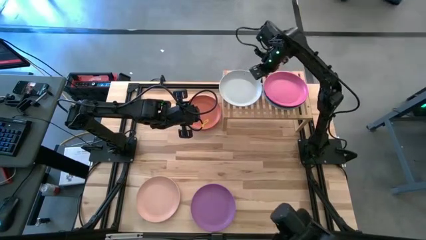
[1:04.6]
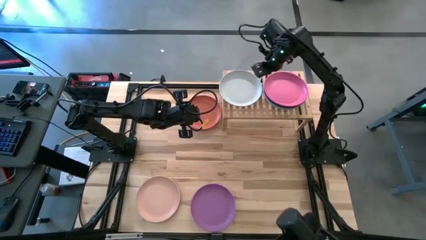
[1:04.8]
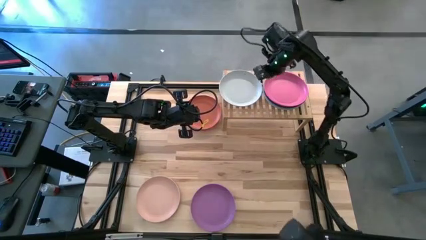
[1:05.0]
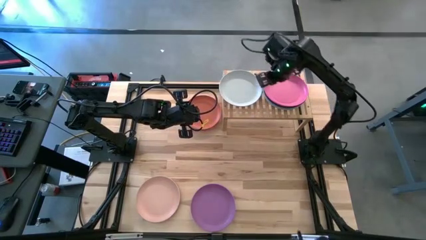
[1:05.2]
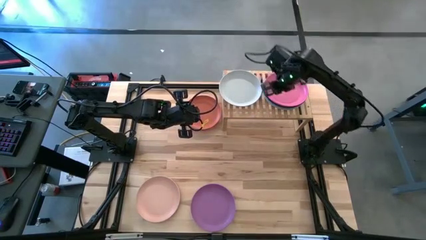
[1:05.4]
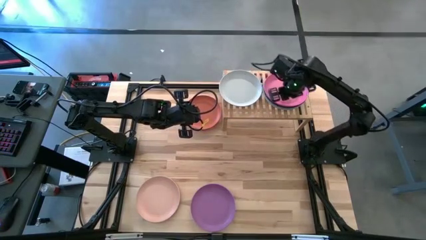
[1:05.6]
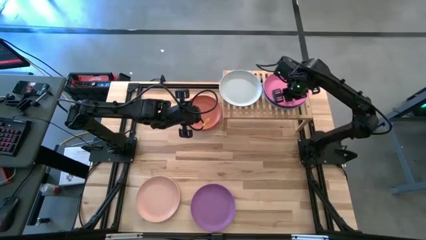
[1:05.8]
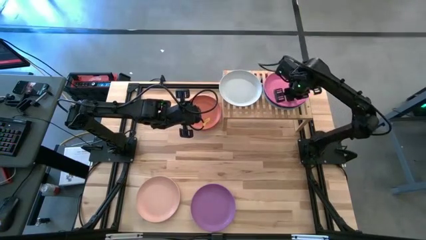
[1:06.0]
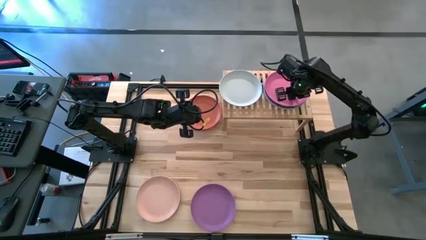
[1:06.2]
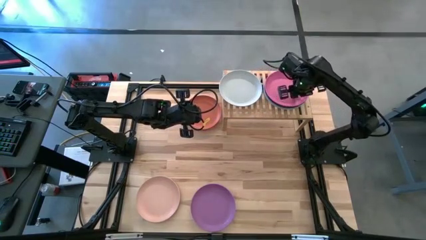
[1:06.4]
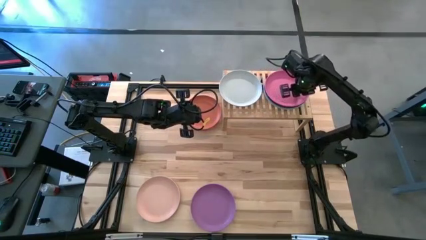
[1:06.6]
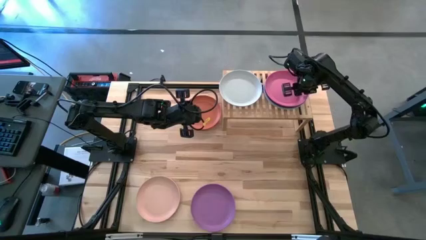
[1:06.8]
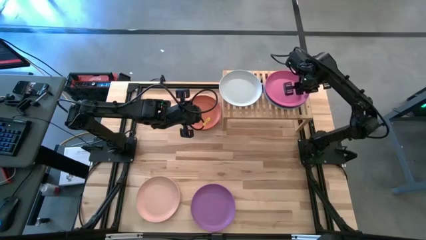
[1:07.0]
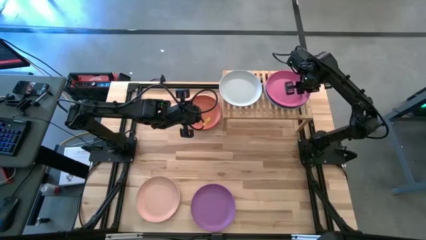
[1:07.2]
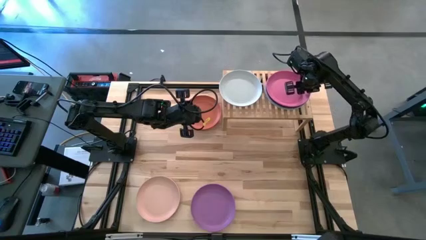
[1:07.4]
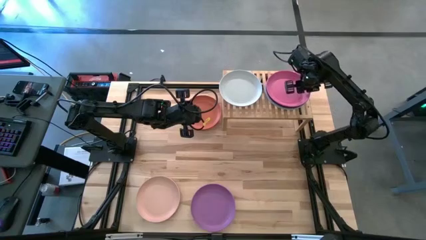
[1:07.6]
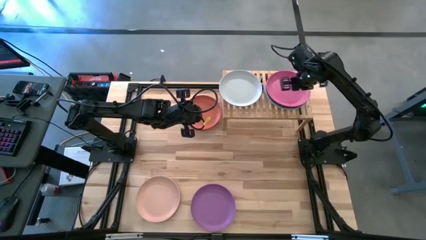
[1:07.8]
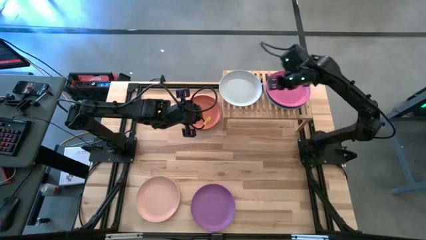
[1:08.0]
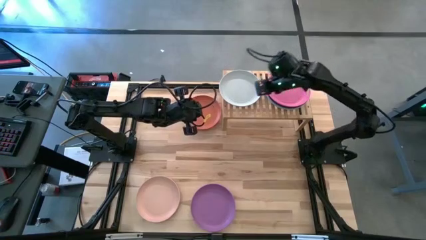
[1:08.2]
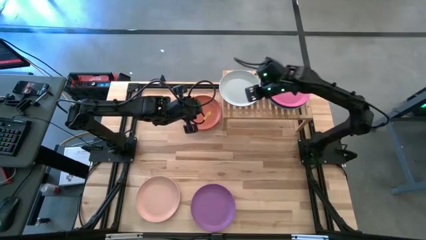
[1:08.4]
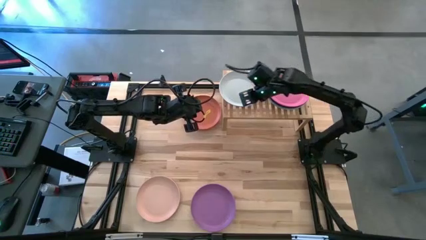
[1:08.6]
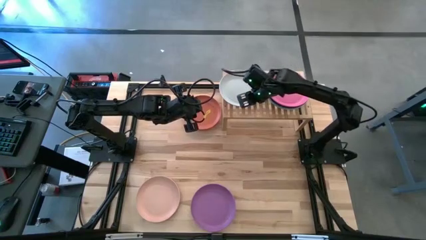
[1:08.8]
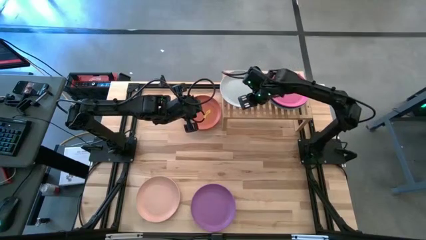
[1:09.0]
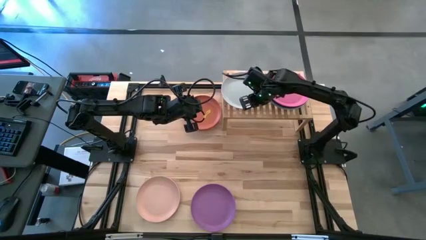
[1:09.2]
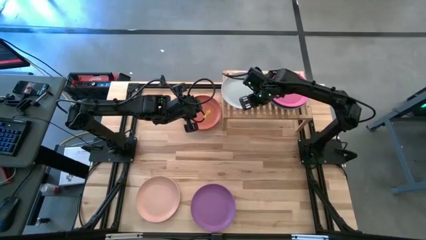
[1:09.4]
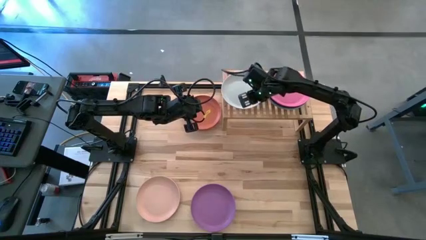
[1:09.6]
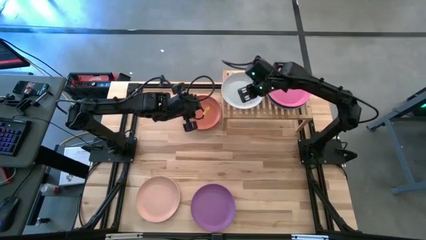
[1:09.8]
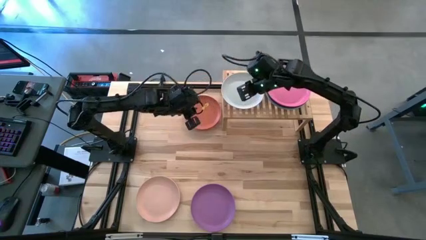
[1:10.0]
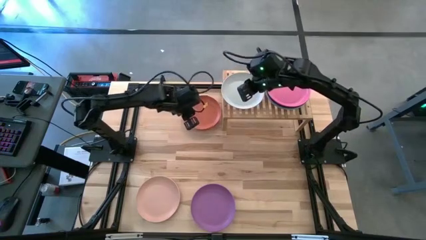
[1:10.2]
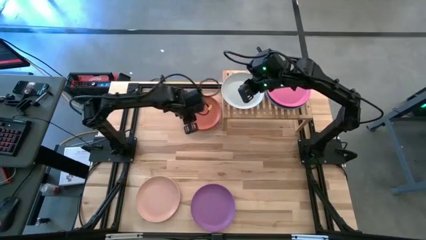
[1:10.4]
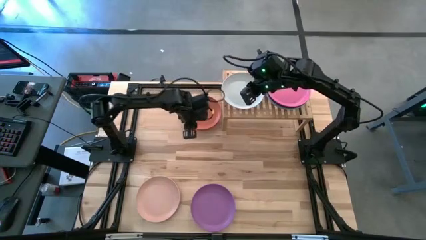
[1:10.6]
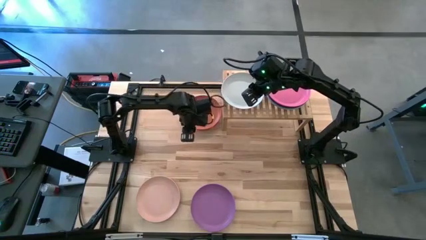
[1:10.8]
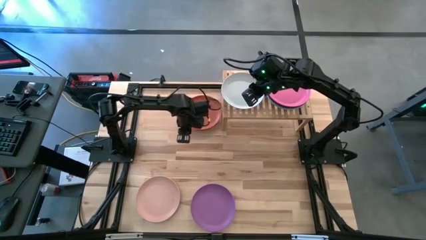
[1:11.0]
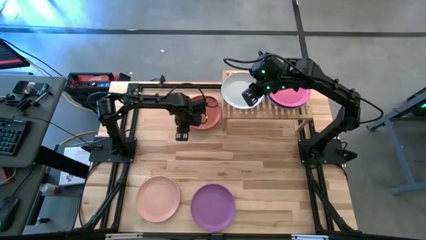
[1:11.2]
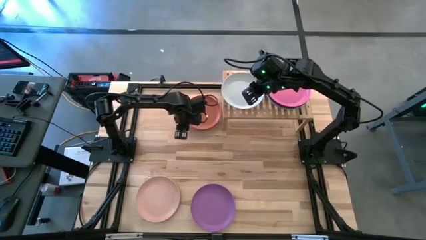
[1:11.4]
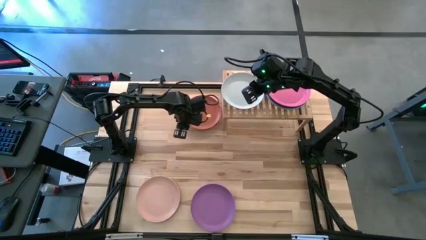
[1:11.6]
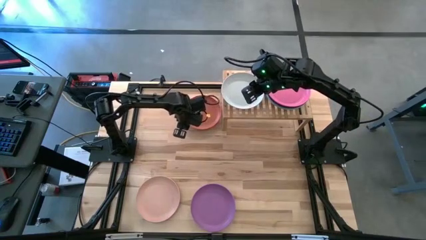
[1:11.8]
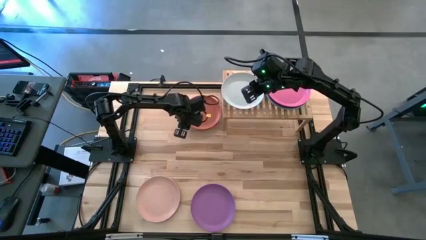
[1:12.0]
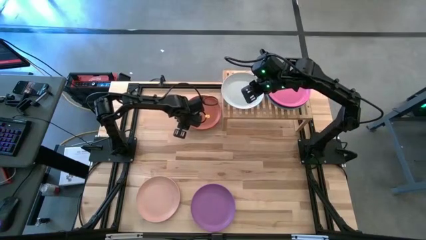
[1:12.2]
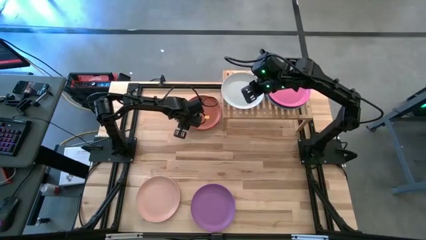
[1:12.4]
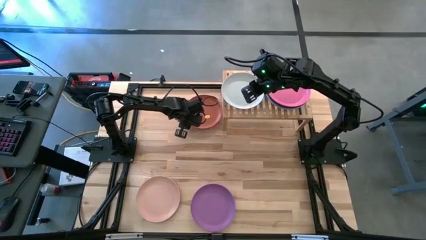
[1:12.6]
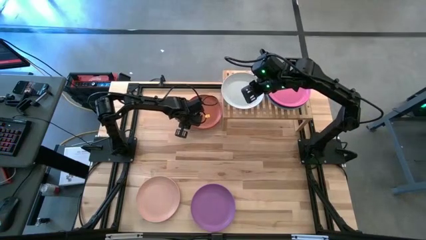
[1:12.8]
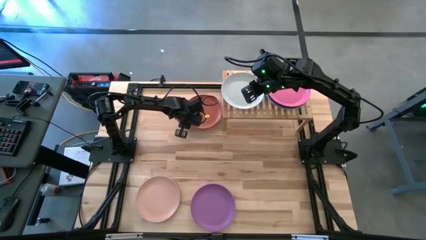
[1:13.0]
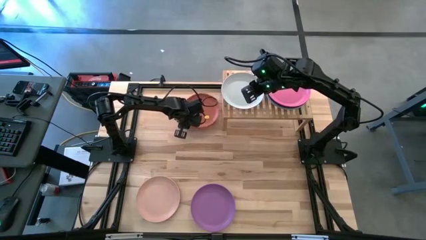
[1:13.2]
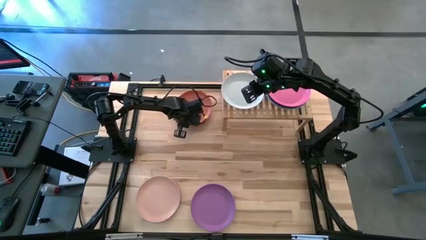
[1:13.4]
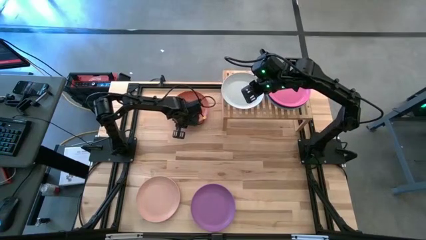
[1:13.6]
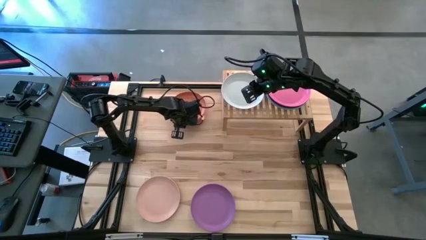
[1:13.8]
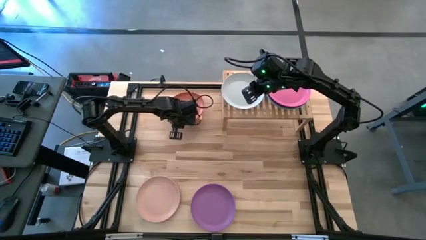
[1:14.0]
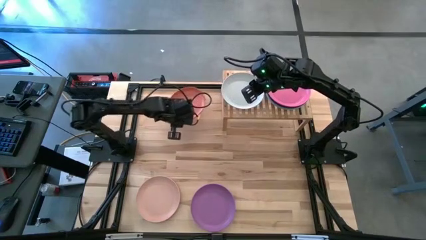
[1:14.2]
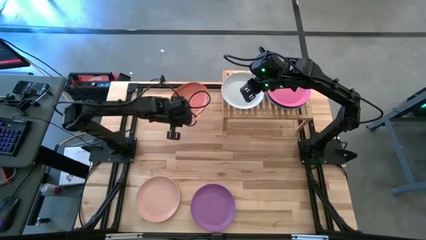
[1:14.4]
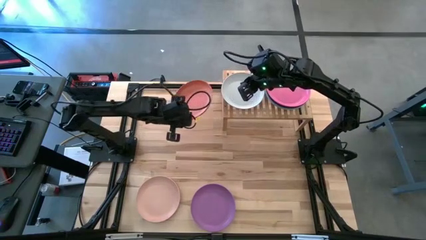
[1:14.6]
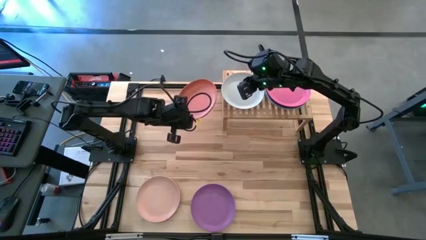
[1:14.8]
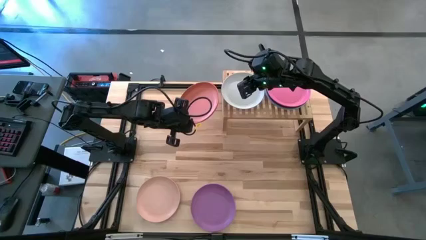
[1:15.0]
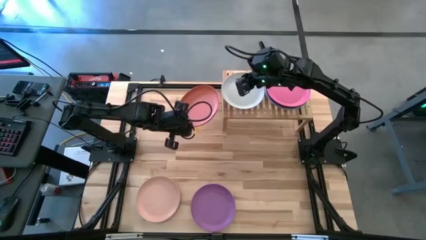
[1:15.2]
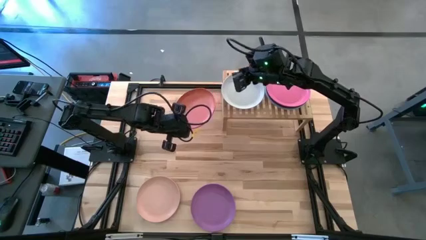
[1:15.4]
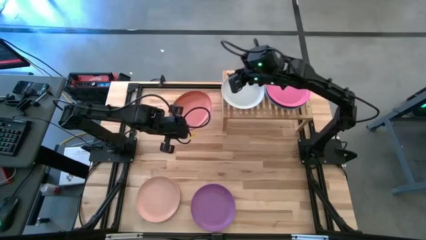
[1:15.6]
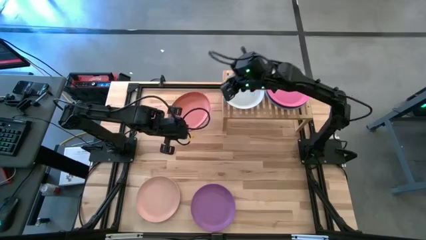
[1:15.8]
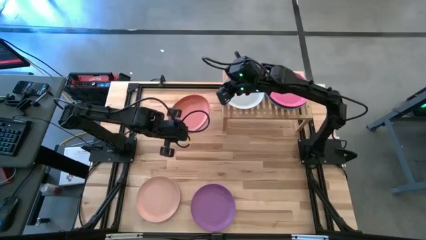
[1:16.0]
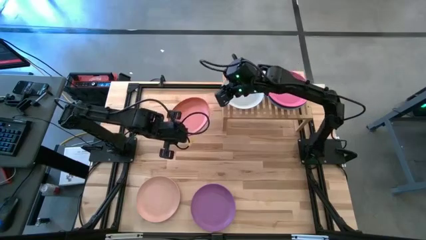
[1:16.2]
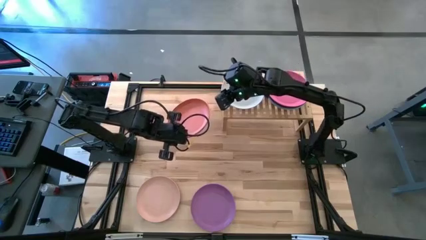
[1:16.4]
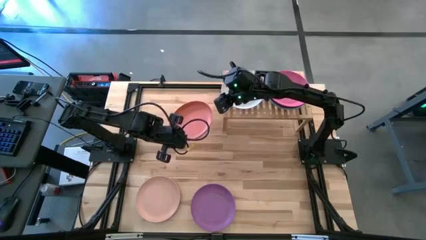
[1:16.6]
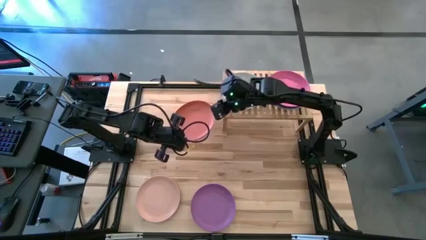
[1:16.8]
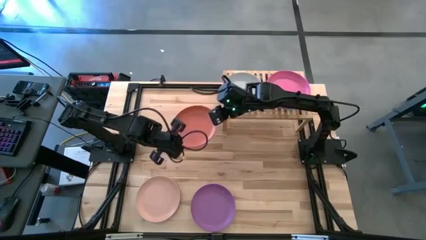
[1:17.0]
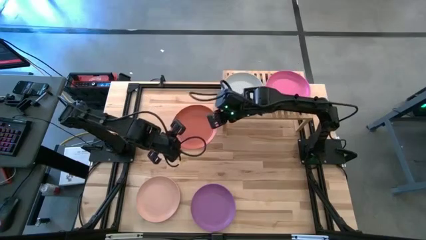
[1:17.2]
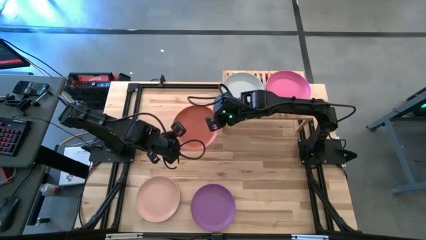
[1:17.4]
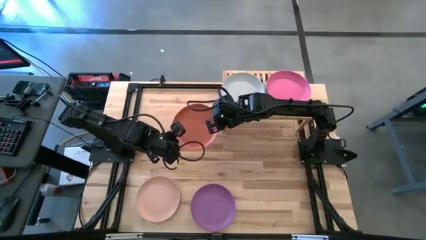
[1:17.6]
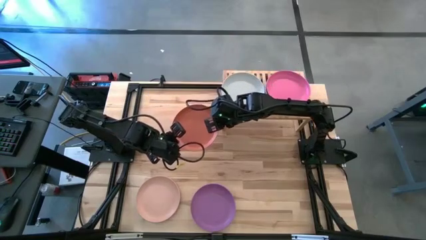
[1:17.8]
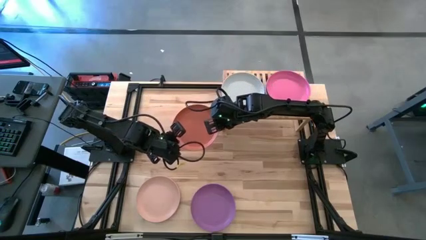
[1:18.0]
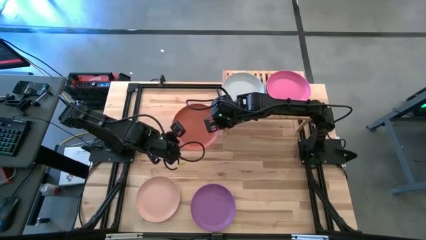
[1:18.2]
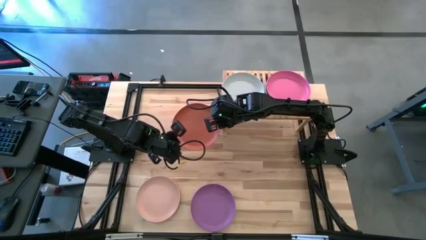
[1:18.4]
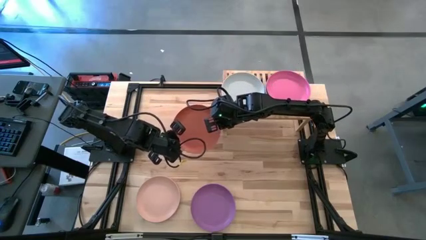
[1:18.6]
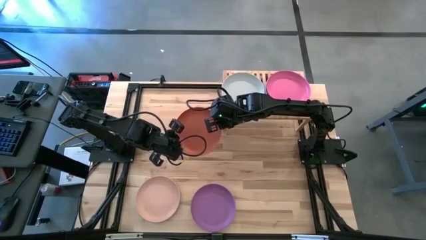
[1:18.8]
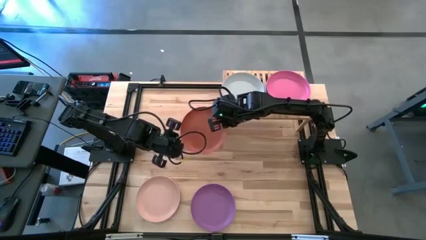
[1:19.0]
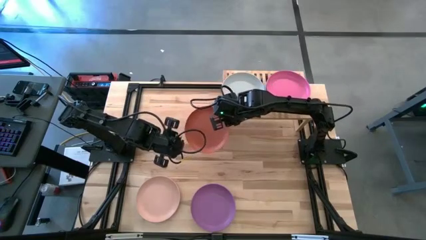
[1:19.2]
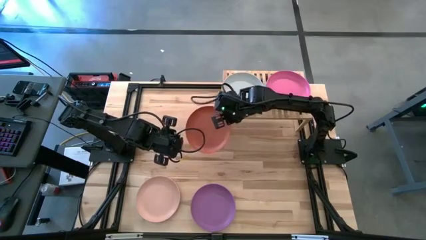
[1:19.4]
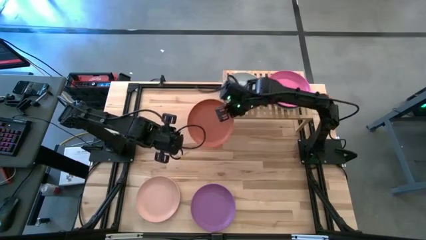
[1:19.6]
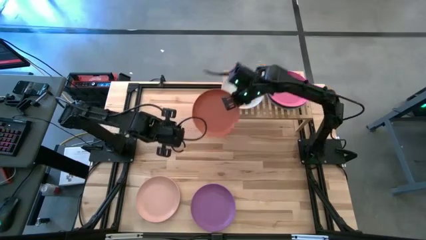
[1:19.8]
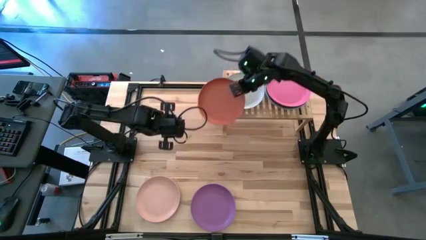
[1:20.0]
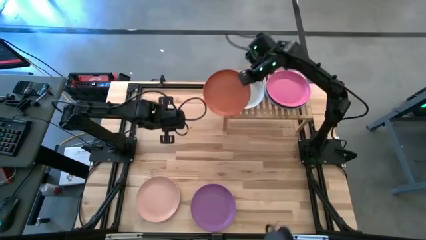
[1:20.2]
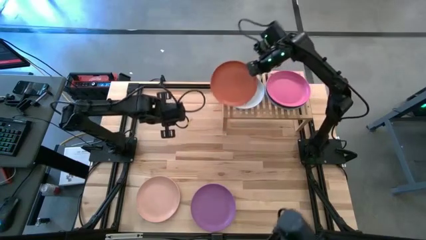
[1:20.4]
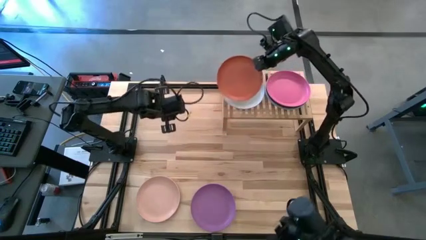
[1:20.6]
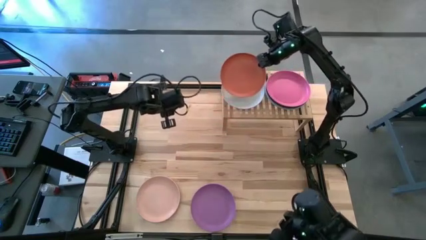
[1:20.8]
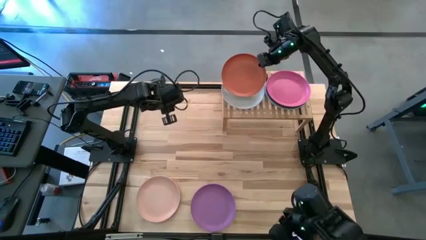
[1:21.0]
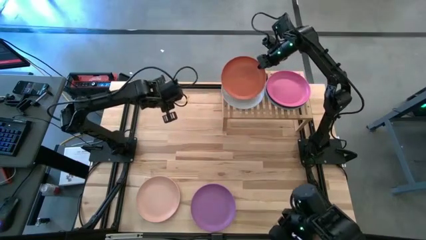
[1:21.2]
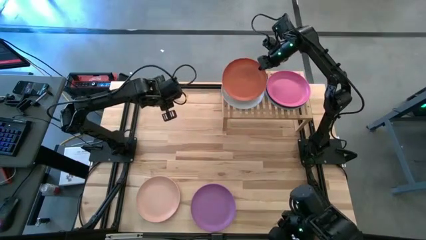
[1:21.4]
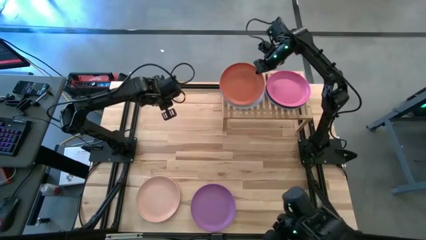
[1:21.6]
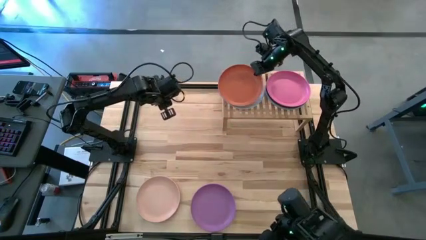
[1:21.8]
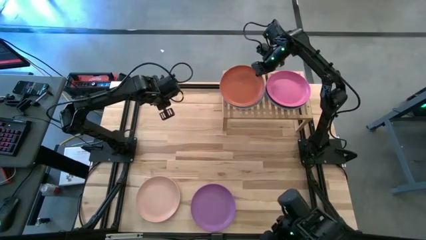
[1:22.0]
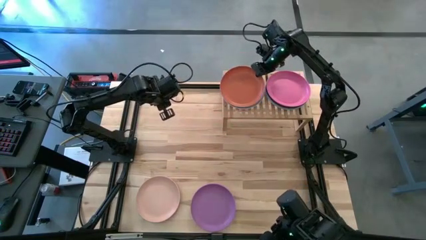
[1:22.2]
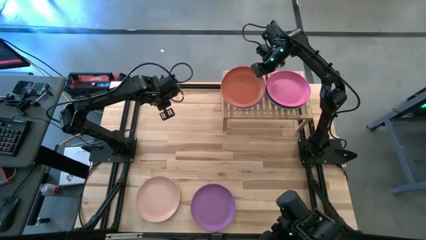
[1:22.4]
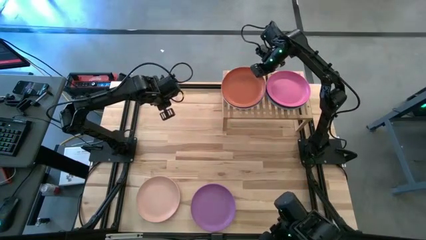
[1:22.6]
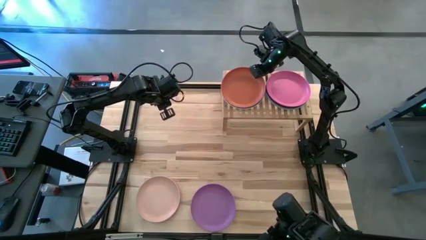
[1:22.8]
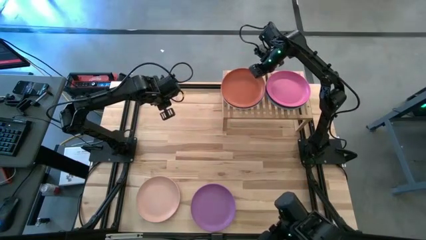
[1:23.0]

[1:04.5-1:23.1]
Task: Place and stack plates onto a shelf
Stack the orange plate on top of the white plate on the shelf
